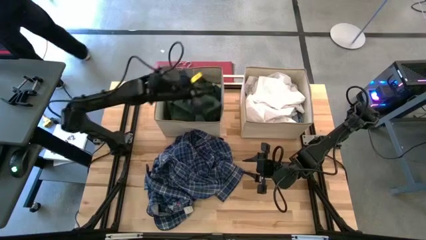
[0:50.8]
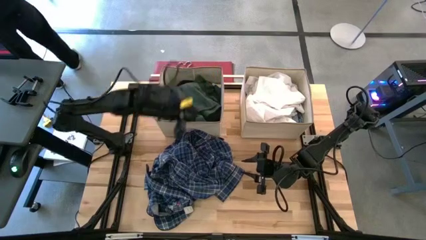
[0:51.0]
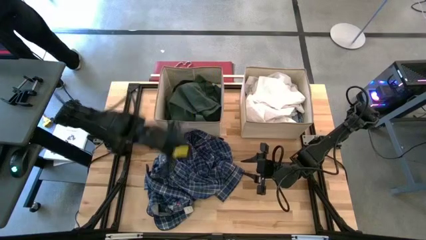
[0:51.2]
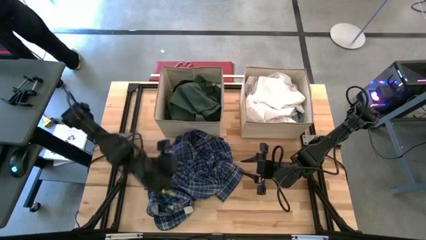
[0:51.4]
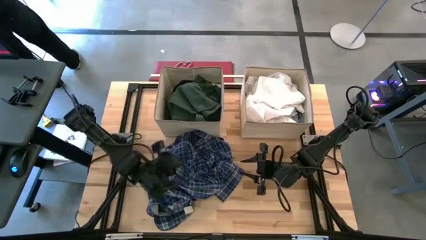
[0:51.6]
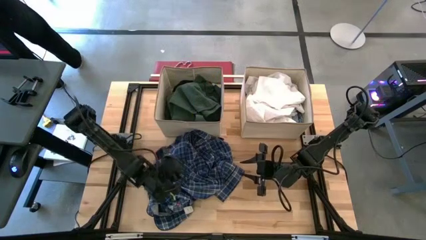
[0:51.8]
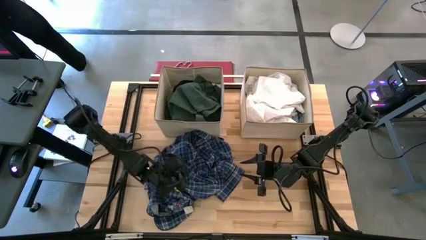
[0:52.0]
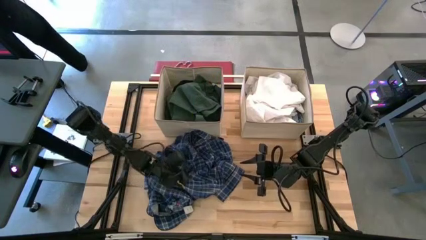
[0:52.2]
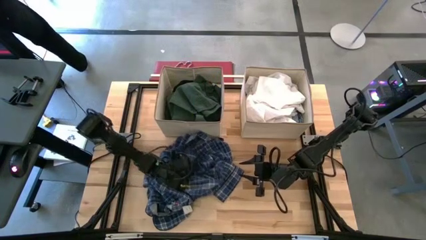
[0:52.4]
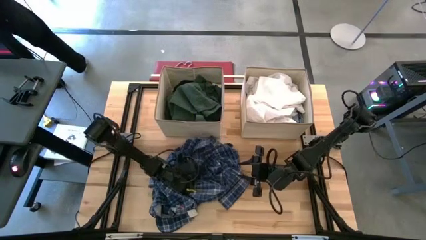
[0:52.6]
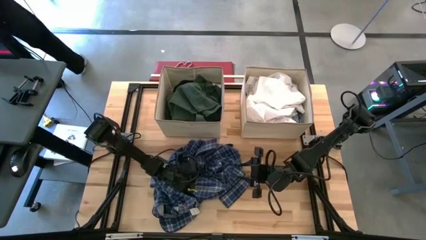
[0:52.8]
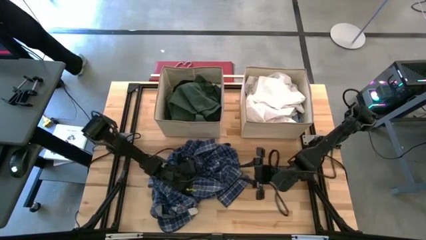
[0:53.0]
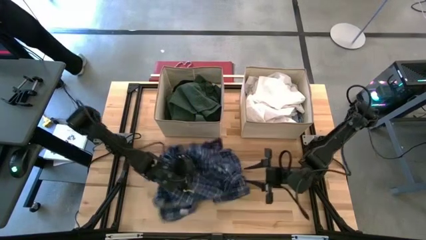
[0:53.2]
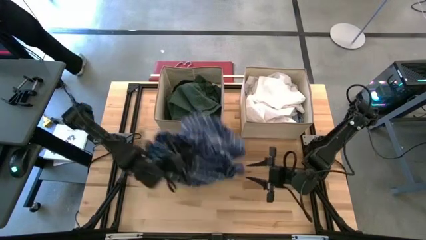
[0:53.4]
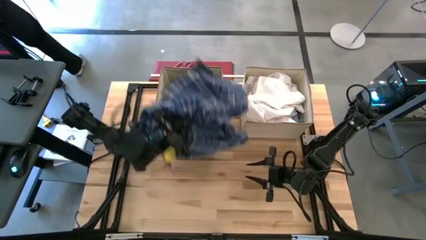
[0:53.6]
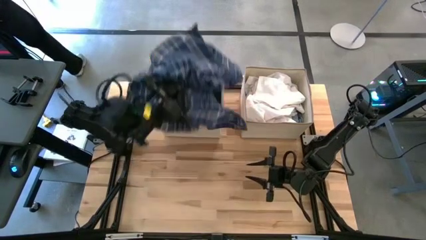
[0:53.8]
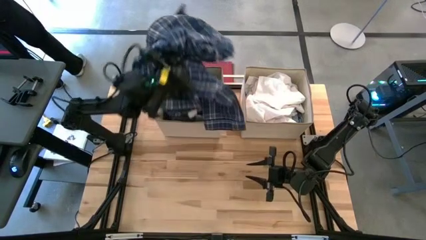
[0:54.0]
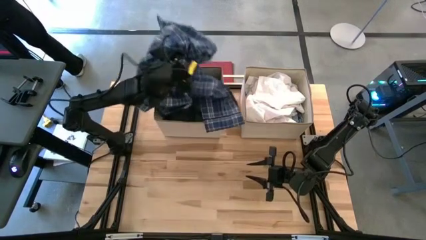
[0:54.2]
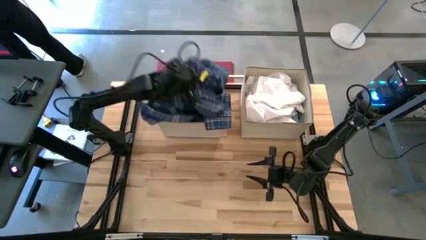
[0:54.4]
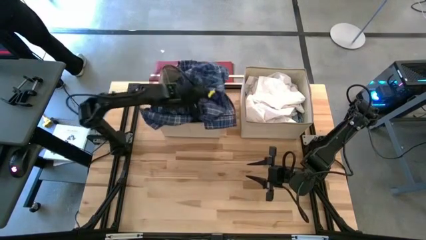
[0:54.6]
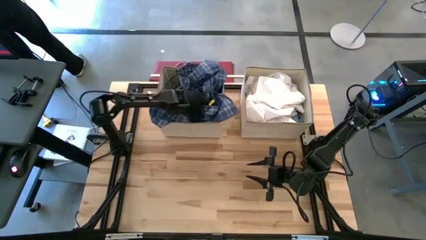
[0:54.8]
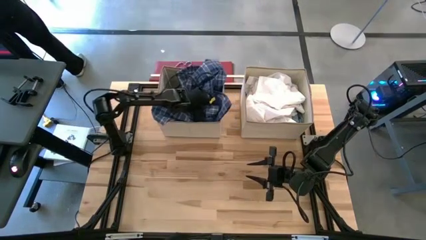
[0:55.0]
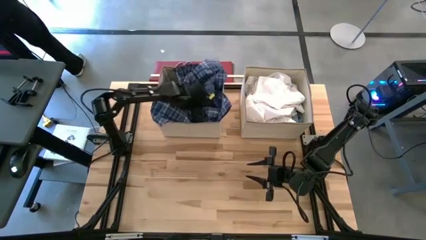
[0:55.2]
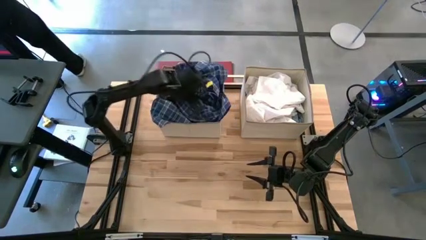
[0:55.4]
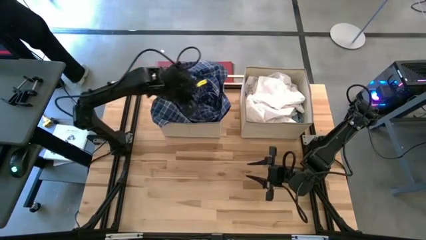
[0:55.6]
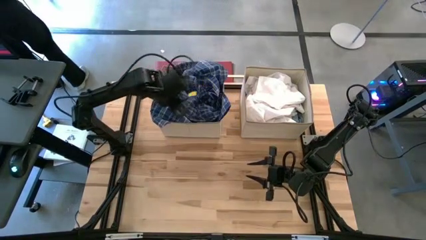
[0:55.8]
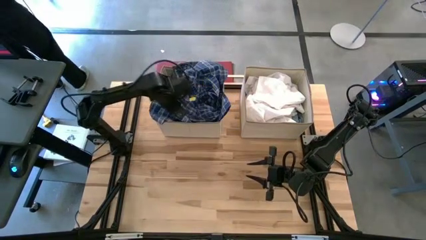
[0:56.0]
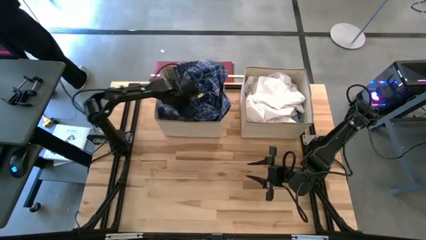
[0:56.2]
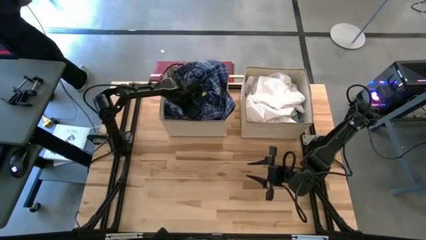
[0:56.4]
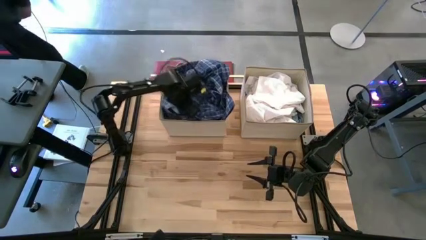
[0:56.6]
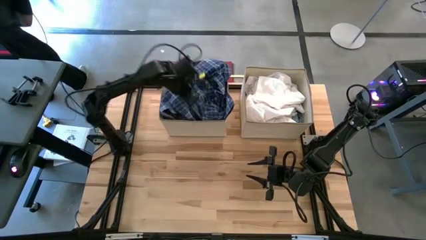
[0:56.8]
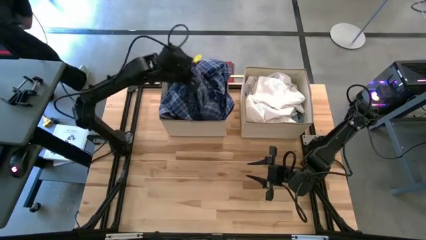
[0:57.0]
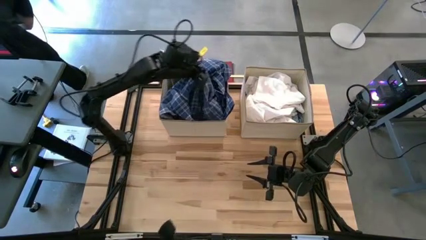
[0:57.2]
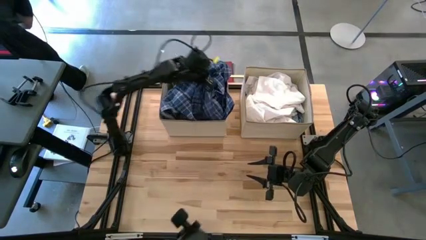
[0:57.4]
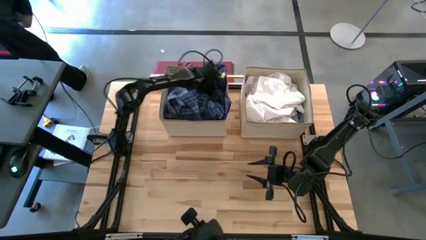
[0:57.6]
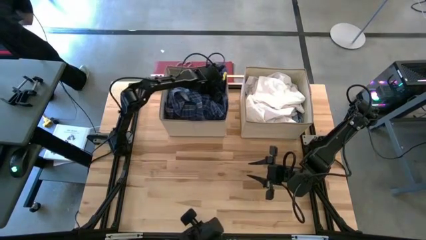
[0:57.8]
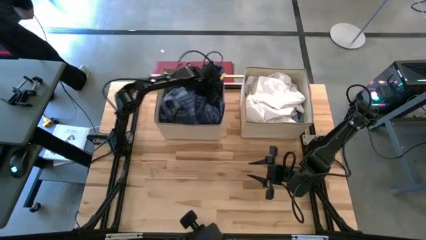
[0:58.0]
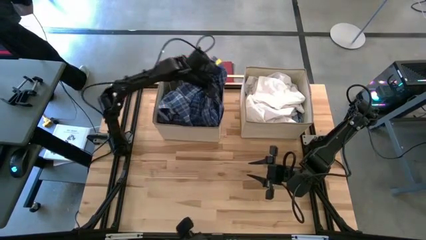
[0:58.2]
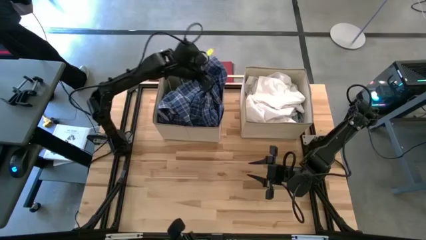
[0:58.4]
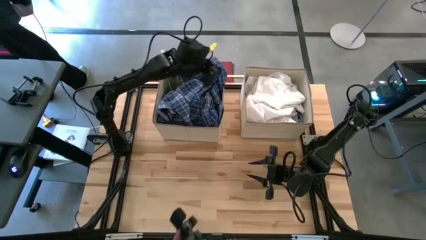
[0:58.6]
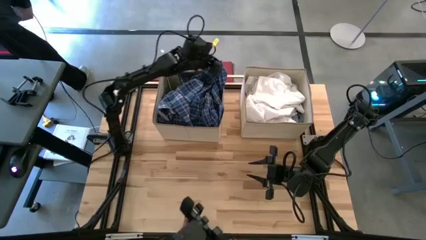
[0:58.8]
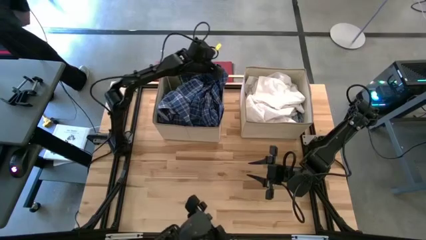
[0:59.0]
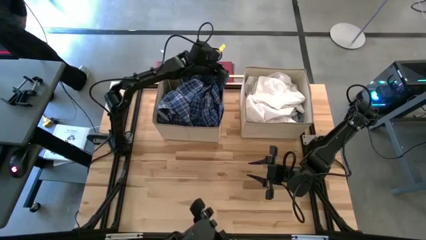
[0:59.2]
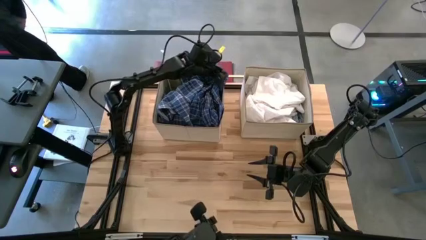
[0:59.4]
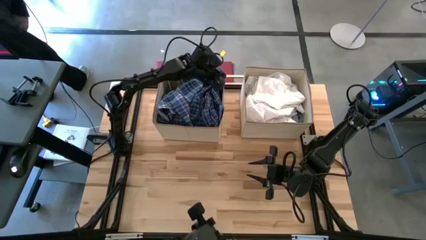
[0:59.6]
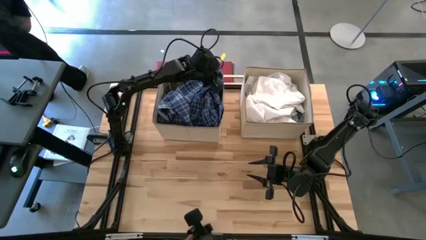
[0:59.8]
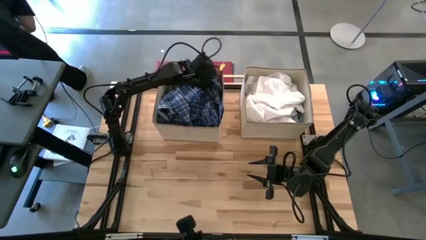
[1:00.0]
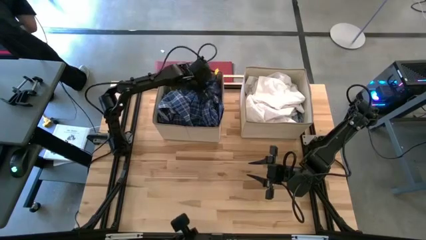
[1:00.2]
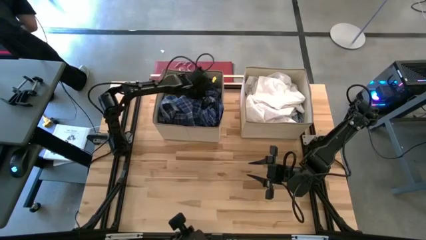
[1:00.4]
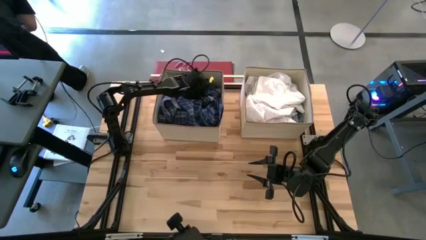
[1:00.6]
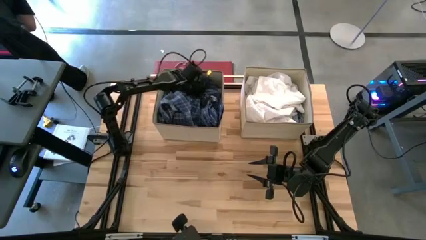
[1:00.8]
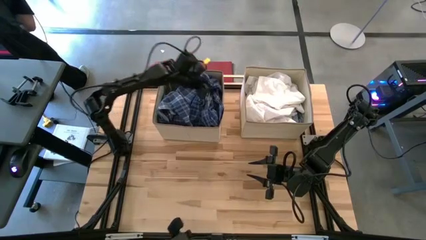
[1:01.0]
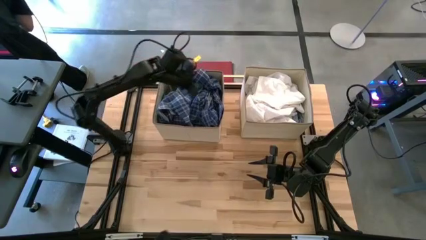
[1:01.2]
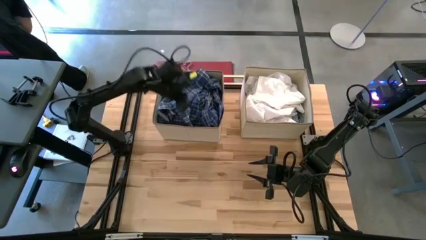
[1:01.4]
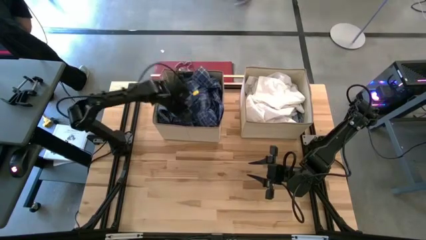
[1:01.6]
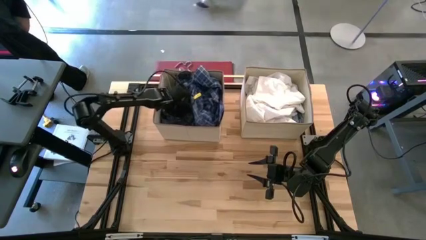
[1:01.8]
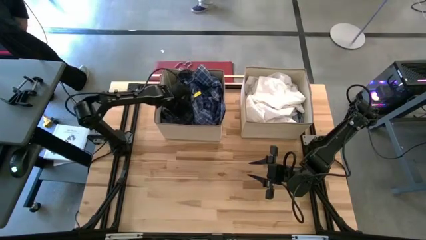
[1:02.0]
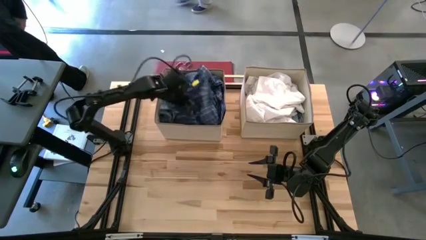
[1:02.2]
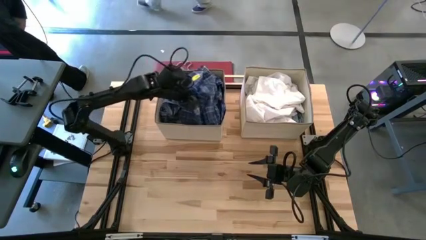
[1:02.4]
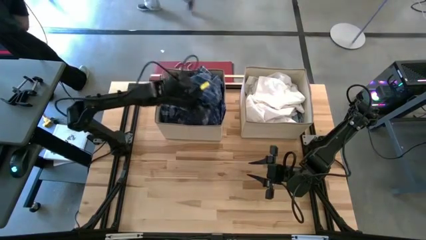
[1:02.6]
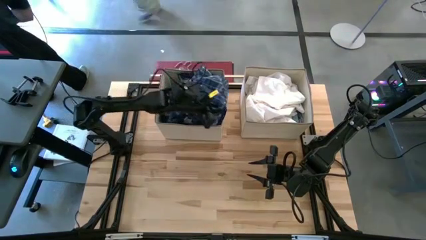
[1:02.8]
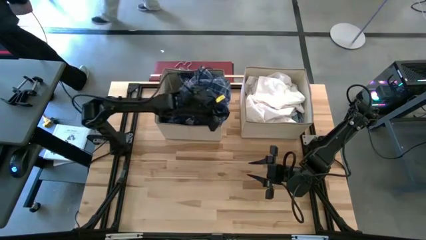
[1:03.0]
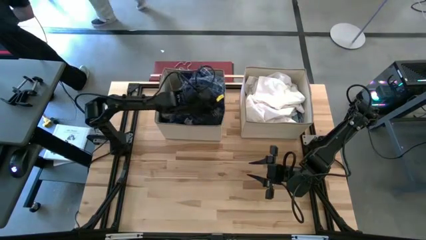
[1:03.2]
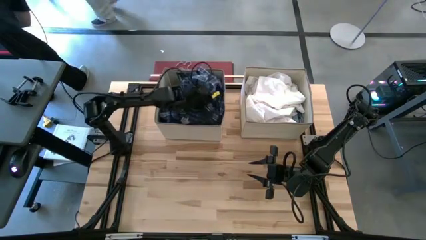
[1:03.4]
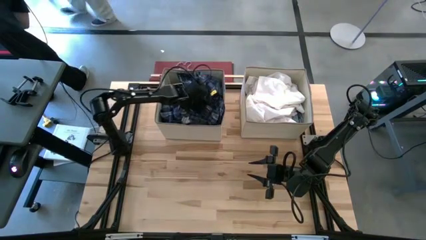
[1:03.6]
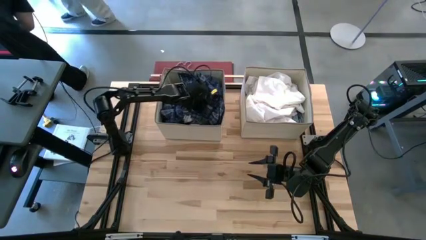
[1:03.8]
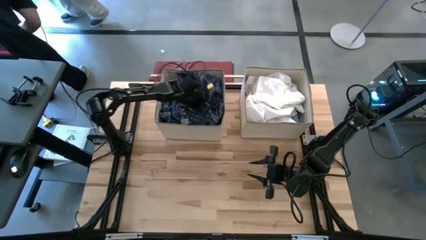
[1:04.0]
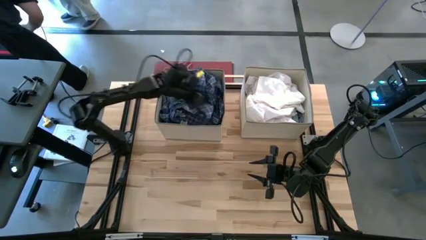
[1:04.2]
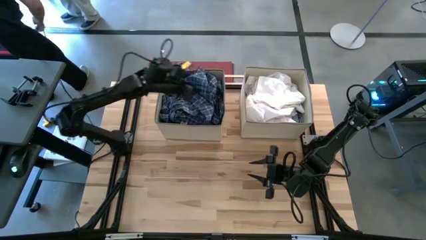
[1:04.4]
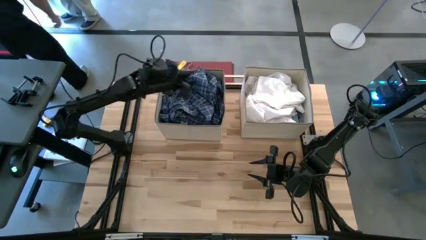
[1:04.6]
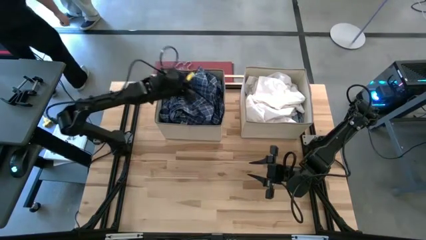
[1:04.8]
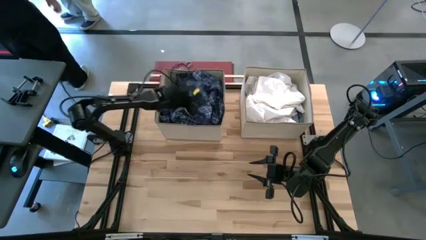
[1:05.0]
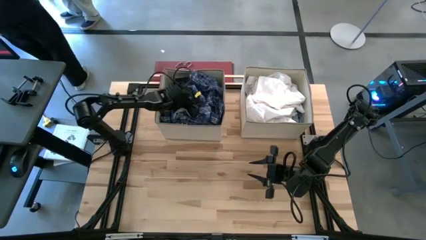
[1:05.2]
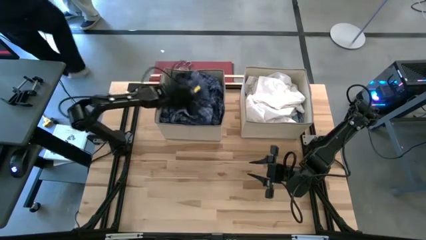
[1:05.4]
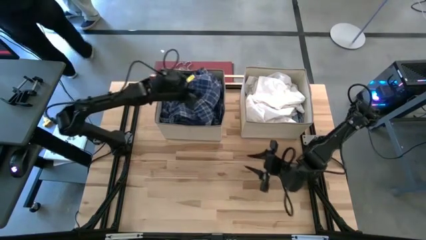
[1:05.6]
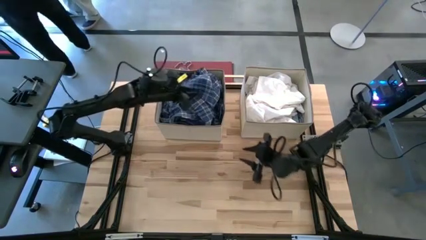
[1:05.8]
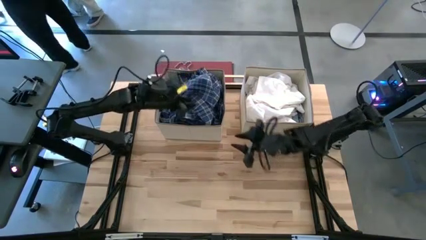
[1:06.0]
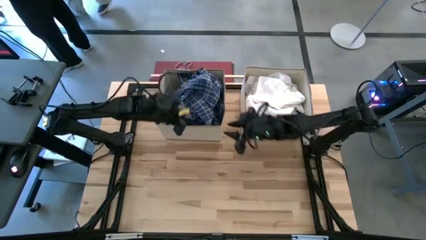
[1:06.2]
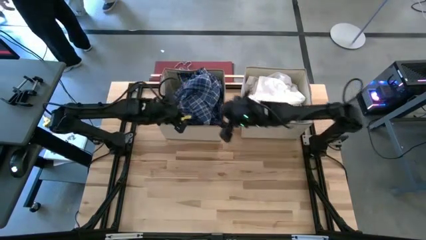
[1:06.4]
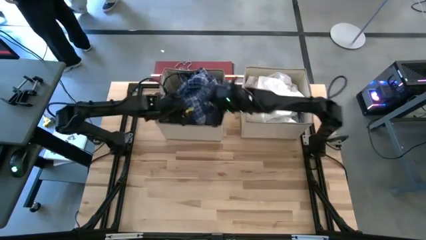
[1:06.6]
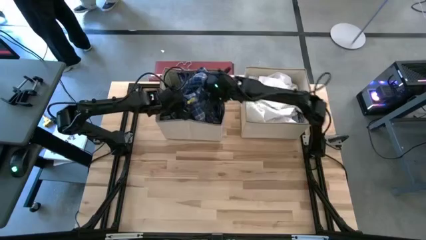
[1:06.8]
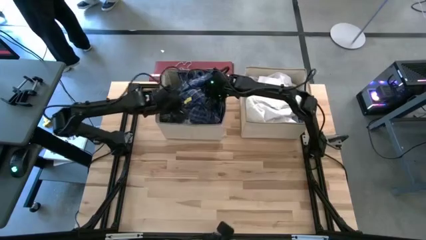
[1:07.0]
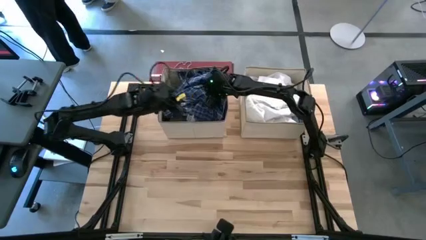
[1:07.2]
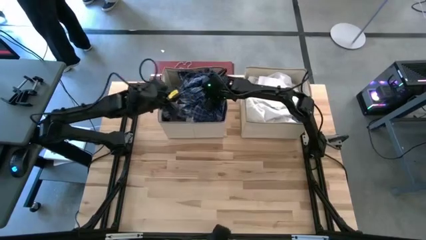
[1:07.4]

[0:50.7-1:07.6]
Task: Sort clothes
Put the blue patterned shirt into the left brown bin
